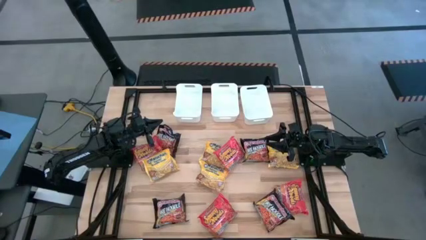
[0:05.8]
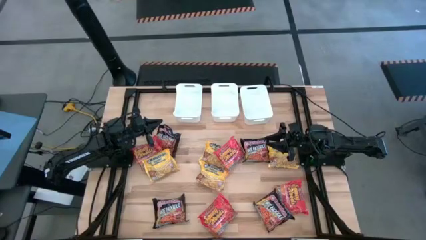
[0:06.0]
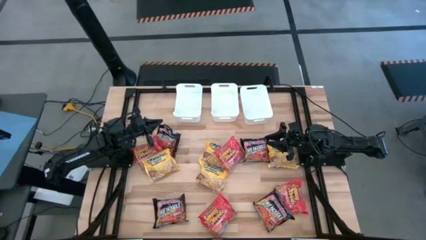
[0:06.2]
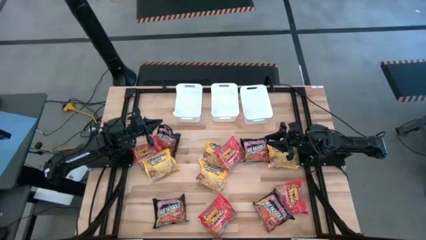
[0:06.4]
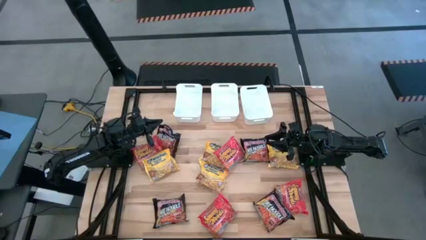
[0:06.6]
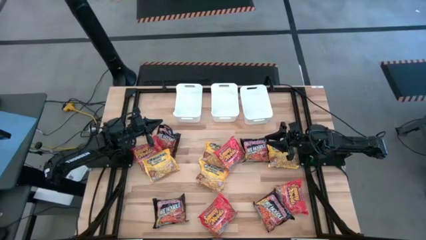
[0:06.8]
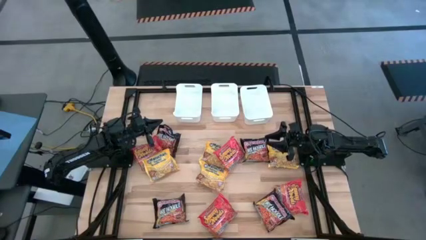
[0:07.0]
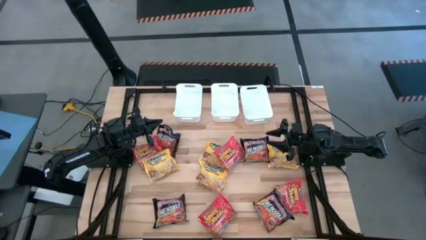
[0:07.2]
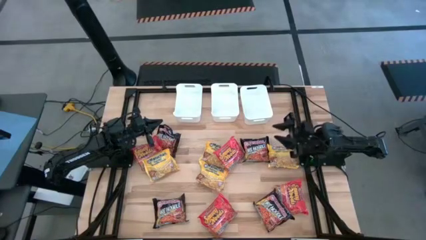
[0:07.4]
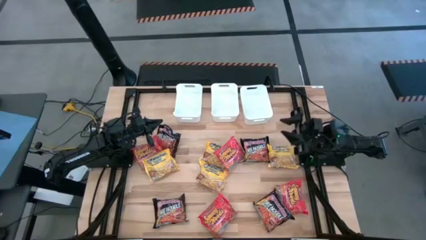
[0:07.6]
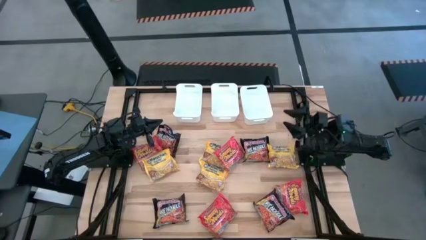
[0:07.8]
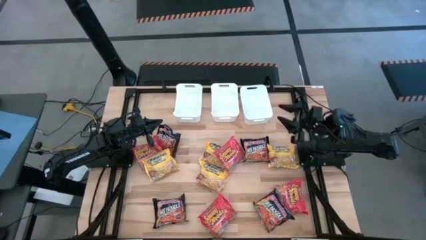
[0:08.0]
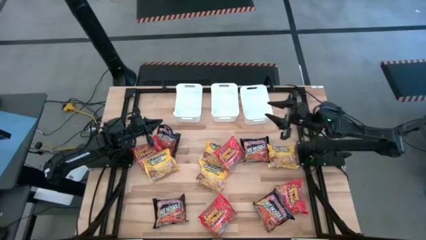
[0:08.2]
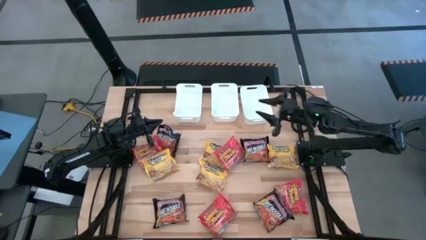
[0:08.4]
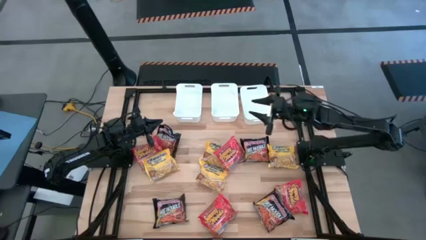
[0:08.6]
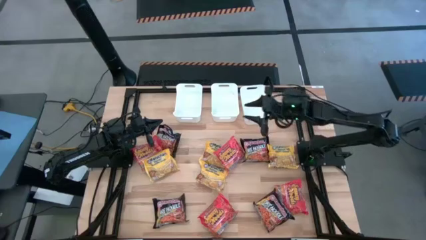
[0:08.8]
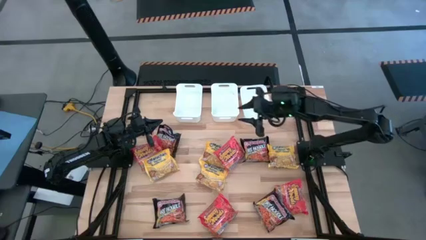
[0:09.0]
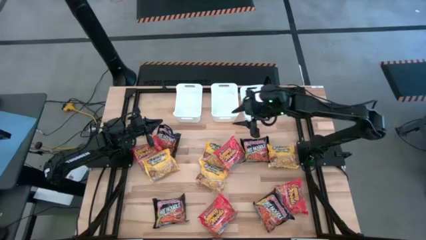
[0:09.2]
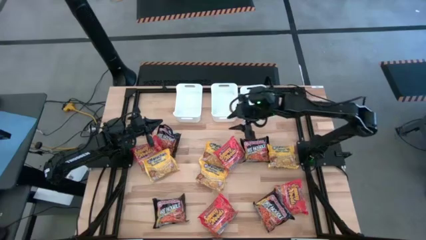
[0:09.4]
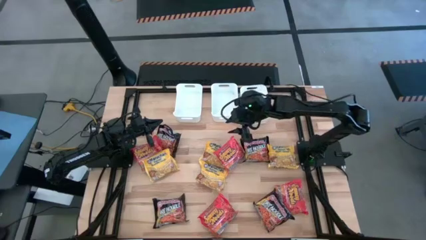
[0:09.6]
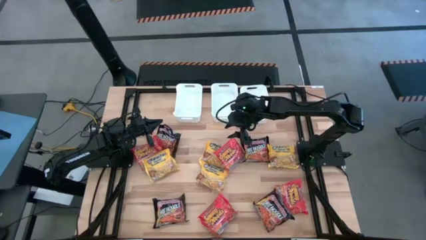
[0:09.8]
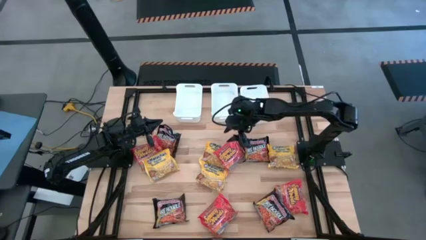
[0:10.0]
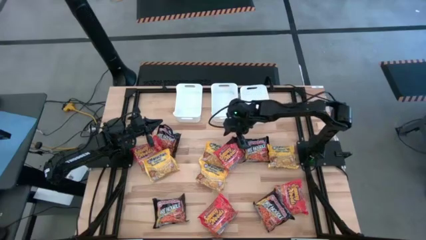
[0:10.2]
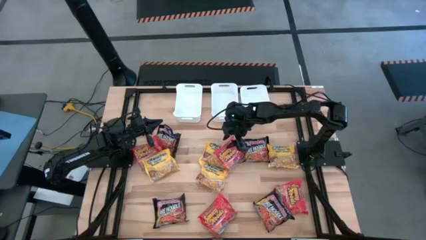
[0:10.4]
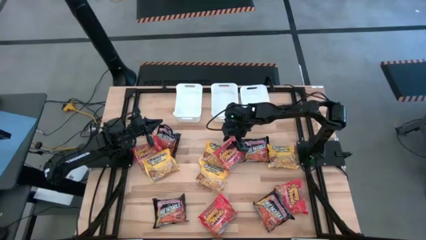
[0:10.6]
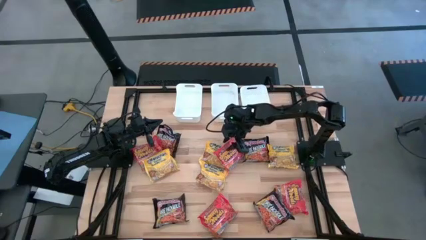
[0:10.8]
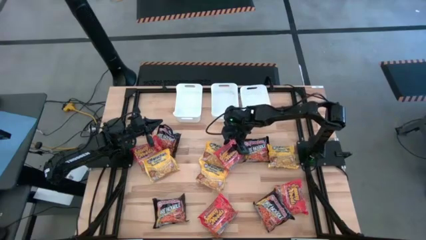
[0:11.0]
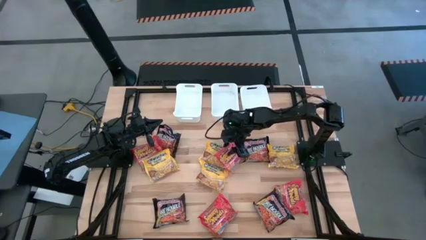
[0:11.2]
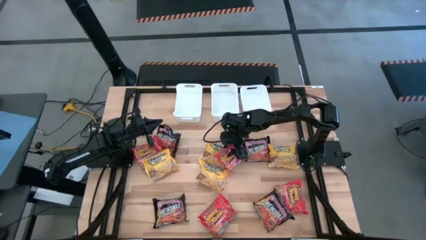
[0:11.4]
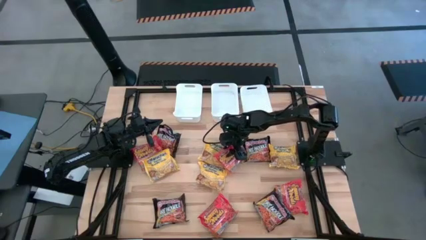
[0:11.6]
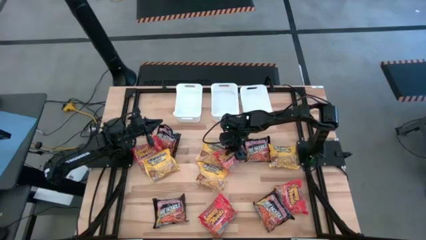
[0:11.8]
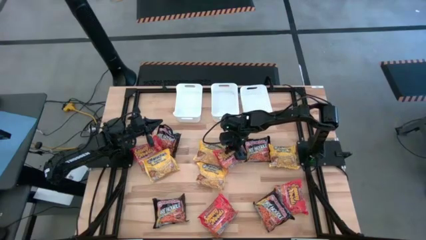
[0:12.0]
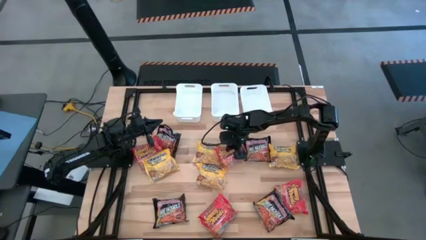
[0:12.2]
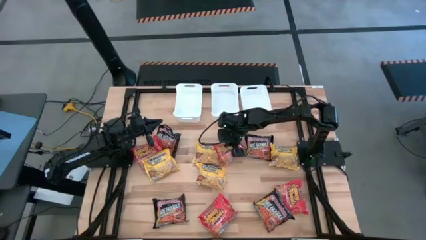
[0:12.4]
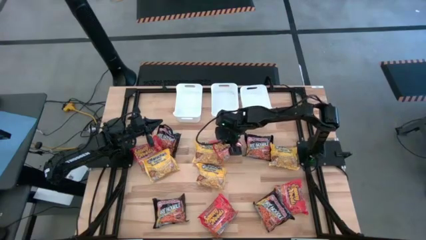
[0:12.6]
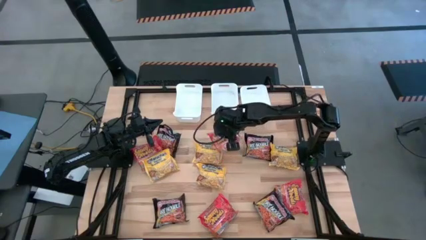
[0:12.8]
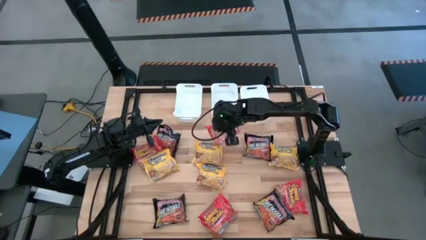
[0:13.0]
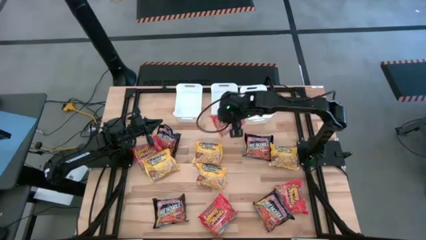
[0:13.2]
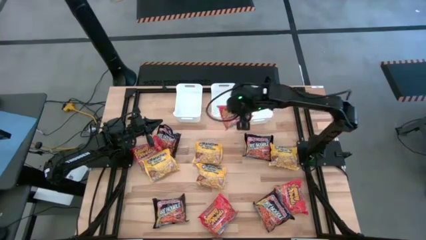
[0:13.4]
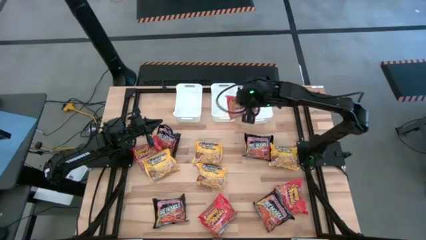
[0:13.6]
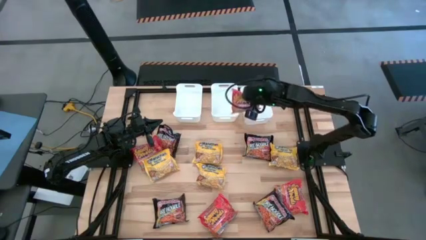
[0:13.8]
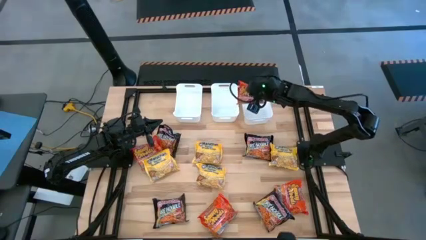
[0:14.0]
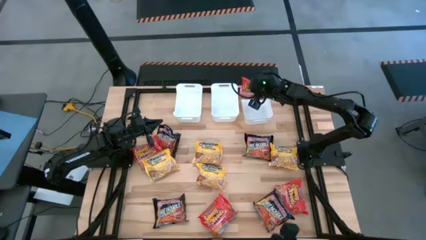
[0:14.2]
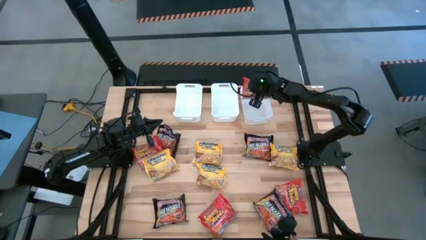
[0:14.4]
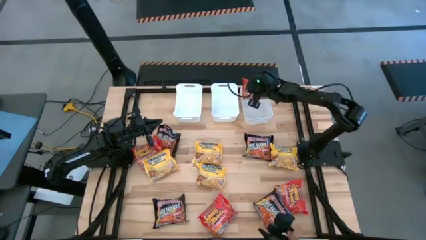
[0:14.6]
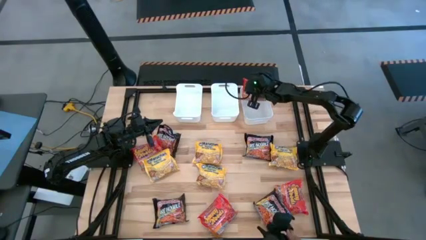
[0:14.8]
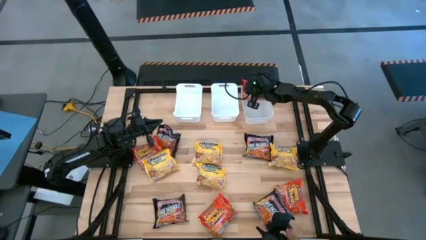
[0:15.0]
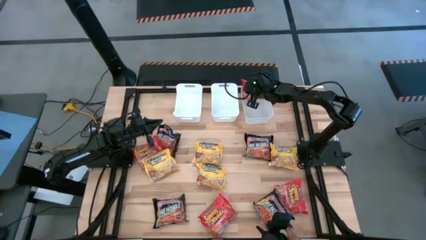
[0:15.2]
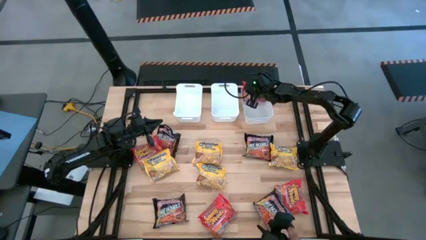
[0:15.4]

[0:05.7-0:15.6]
Task: Sort Maruchan noodles
Put the orange noodle pack into the right white bin

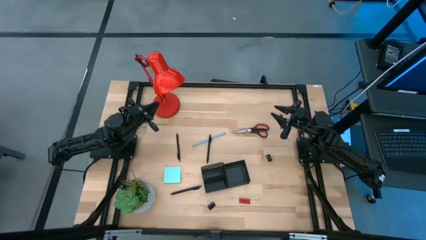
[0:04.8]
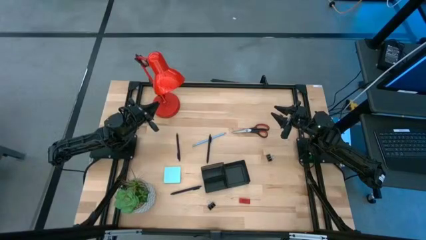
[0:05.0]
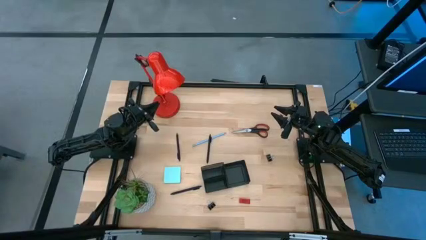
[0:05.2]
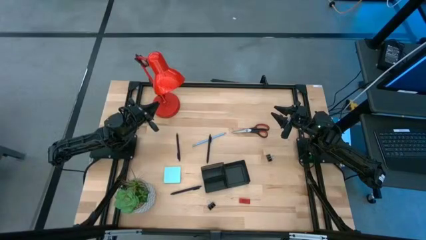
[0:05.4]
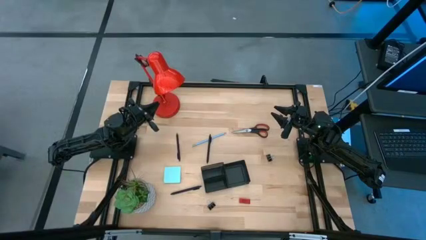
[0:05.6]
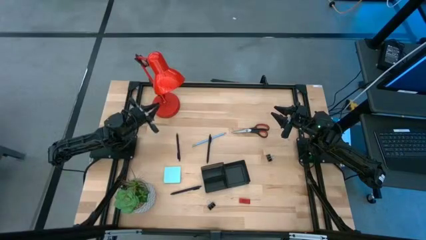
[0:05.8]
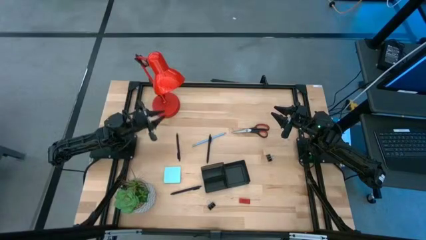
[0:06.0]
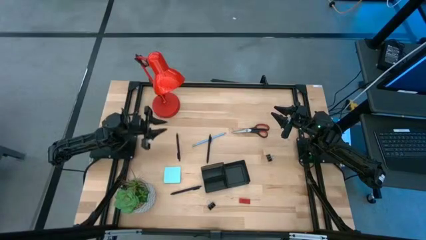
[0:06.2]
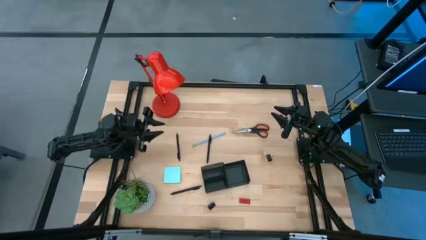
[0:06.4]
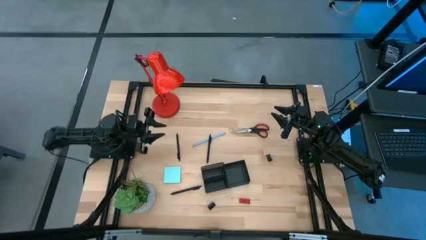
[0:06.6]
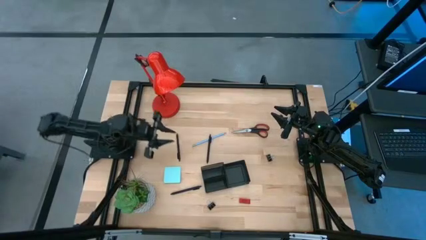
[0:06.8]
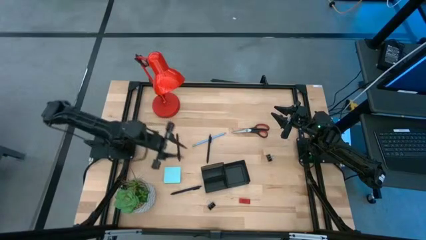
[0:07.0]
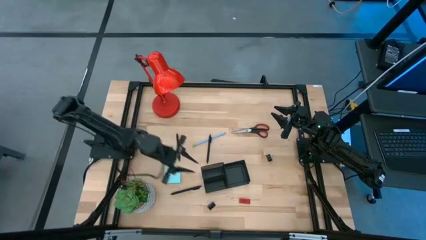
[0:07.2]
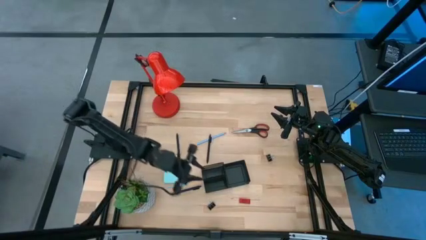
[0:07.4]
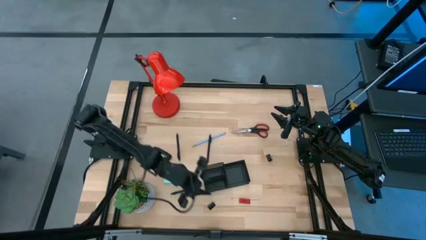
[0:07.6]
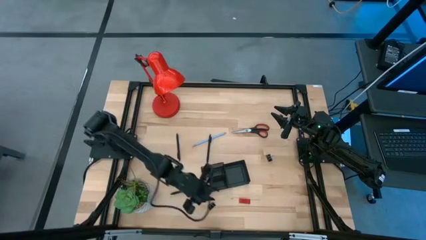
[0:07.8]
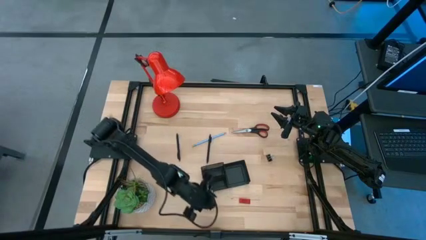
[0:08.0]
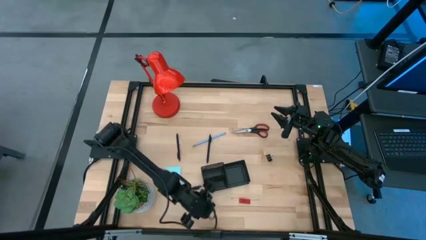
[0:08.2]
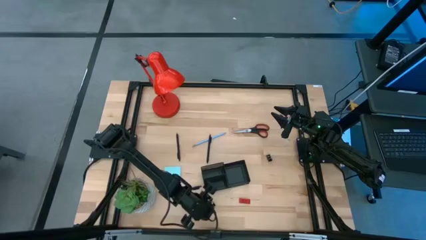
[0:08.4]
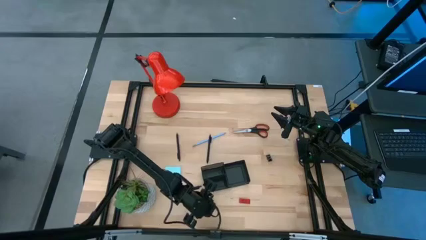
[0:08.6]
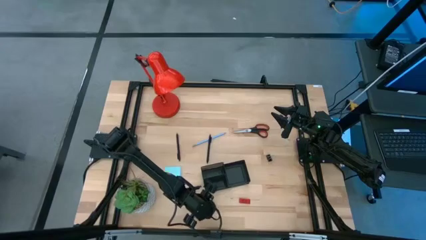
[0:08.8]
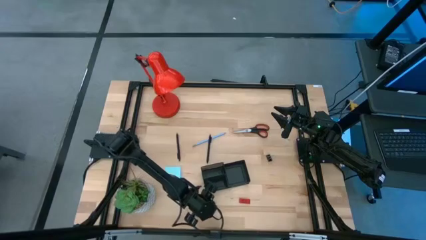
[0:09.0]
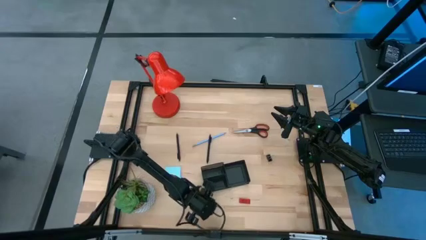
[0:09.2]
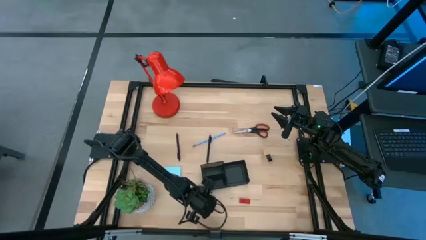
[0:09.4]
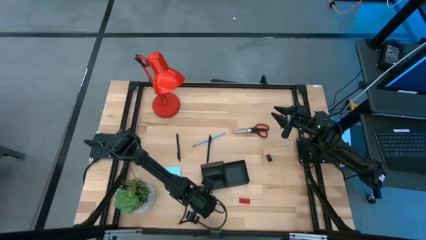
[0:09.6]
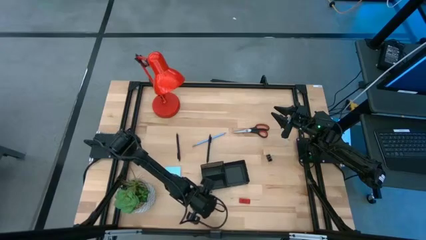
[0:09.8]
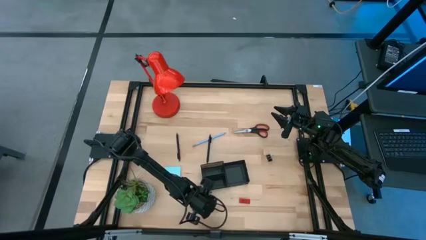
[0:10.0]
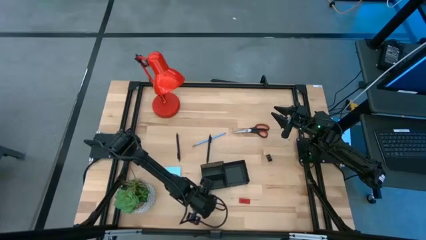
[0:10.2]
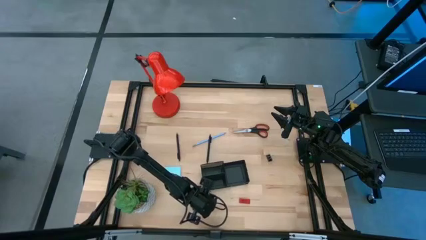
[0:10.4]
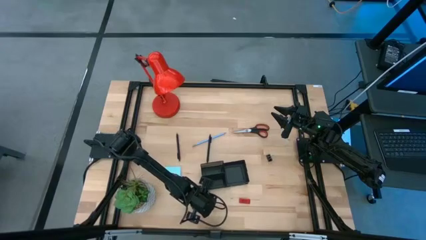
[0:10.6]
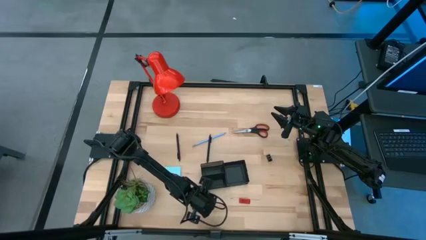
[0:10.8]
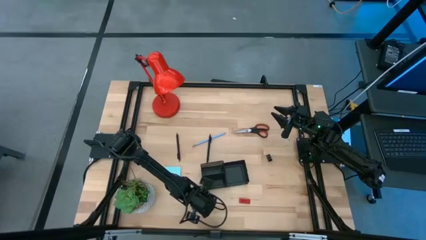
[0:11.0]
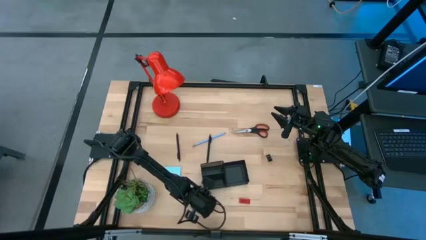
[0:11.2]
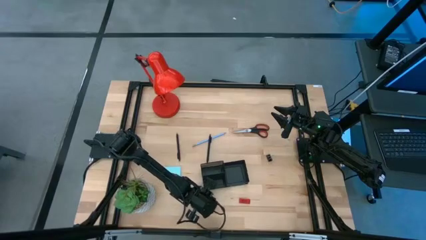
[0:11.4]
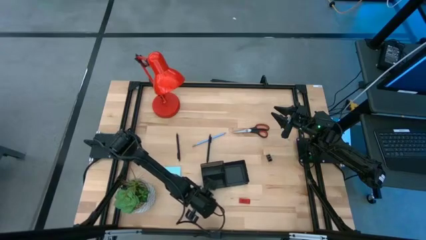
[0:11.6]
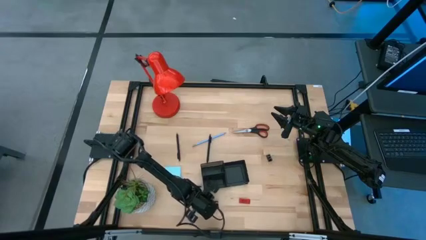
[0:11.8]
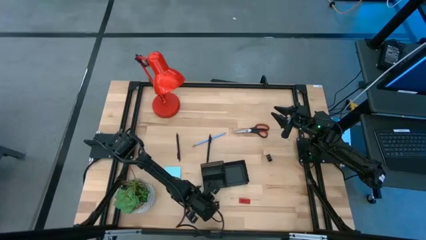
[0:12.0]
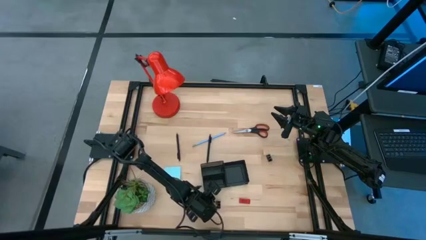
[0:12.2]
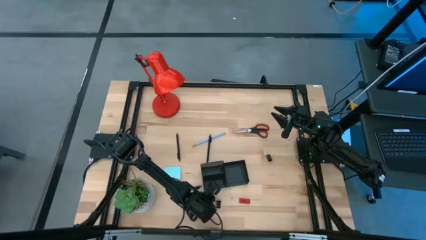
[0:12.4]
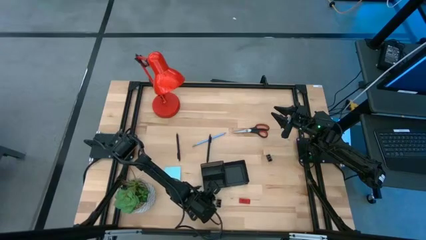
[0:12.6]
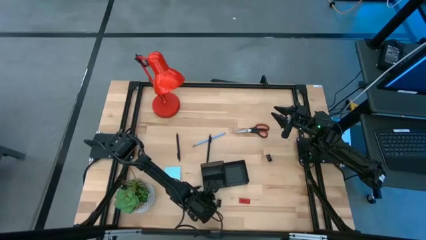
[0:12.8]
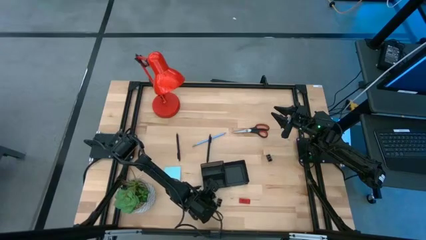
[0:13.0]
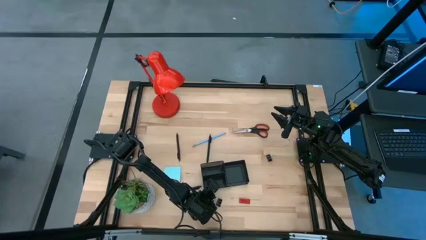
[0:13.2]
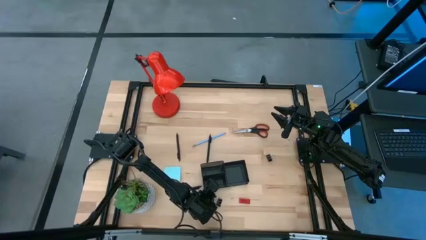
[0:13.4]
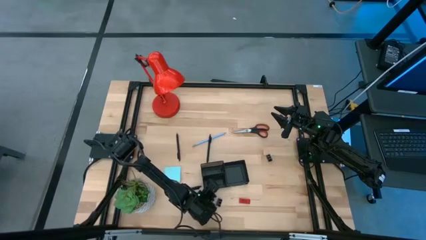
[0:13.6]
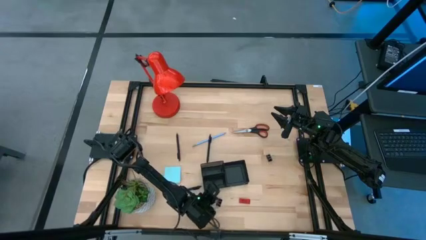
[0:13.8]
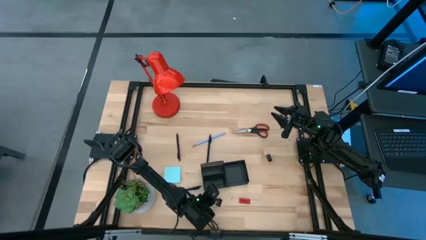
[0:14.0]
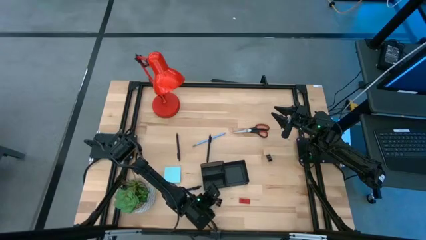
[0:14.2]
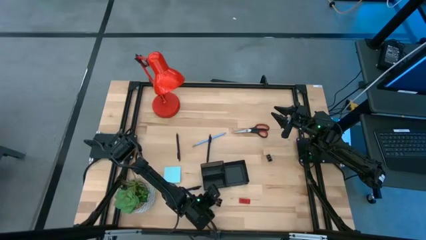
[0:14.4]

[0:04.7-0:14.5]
Task: Pick and place office supplies into organizer
Put the bottom black binder clip into the black desk organizer
